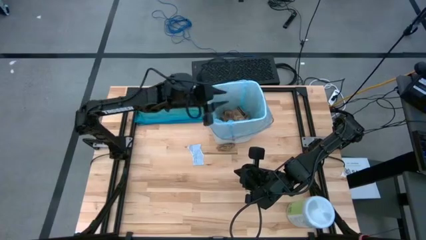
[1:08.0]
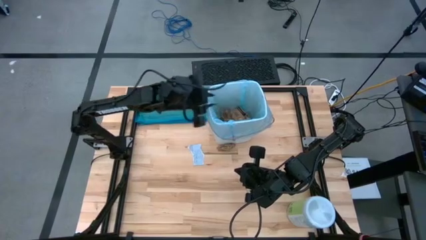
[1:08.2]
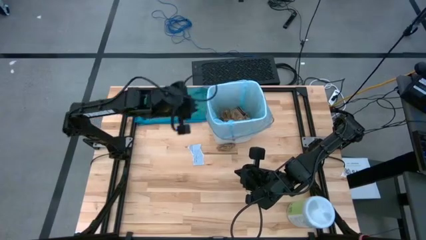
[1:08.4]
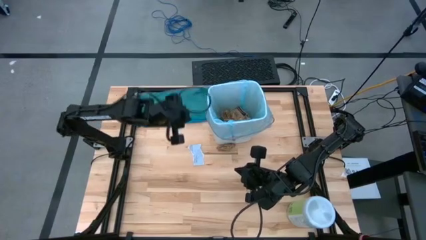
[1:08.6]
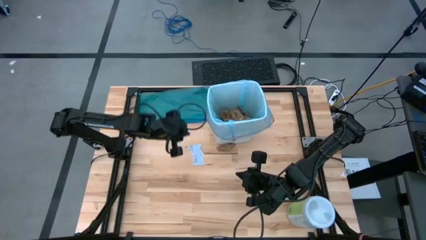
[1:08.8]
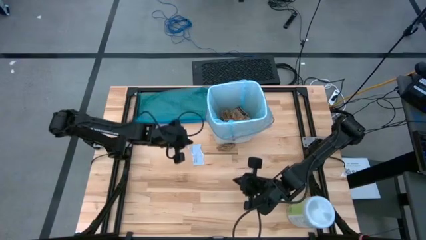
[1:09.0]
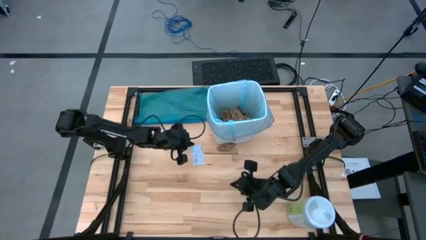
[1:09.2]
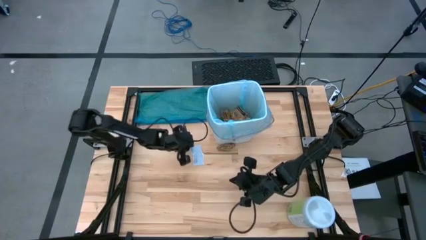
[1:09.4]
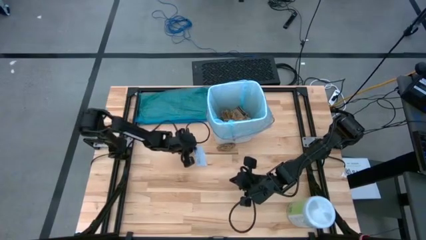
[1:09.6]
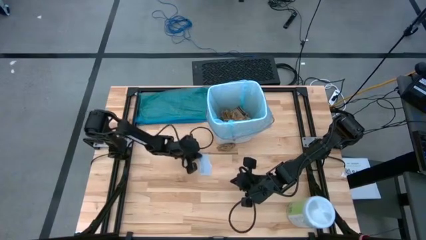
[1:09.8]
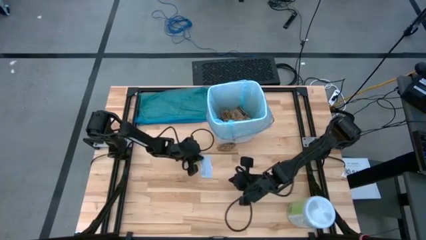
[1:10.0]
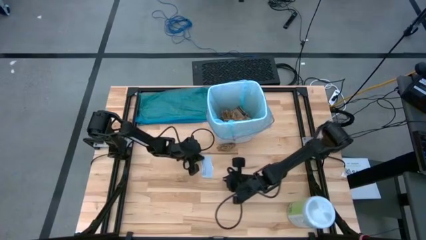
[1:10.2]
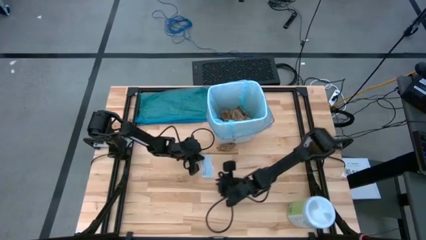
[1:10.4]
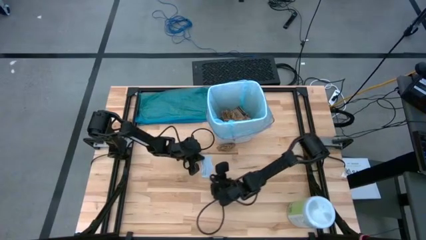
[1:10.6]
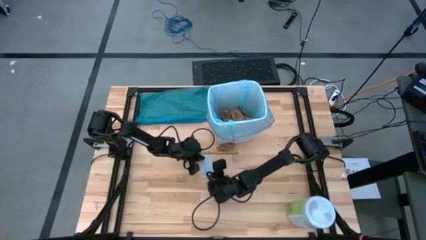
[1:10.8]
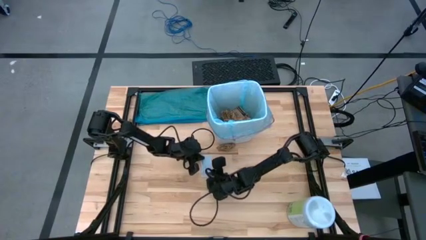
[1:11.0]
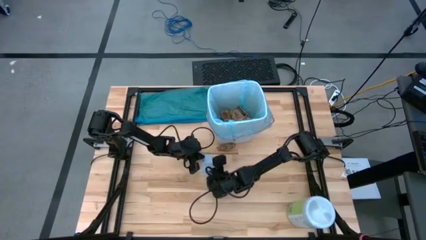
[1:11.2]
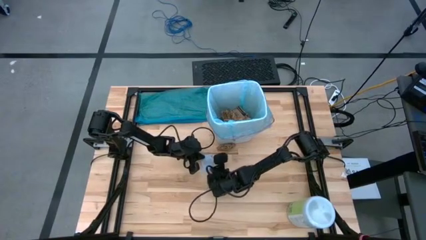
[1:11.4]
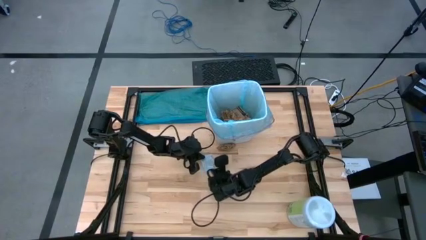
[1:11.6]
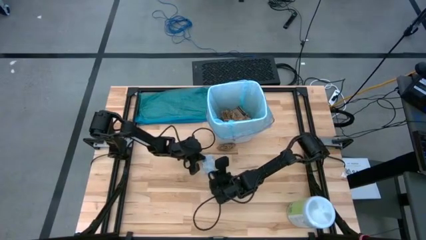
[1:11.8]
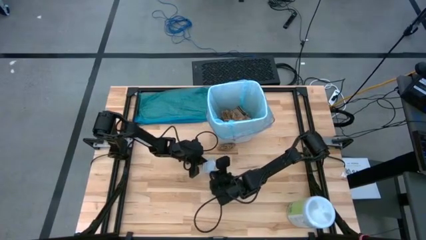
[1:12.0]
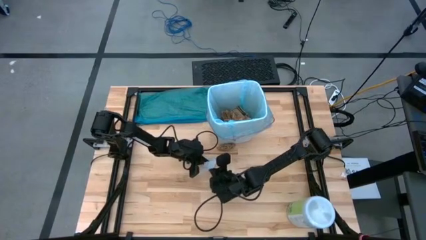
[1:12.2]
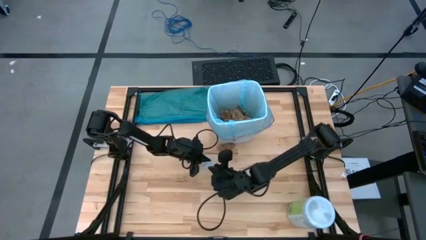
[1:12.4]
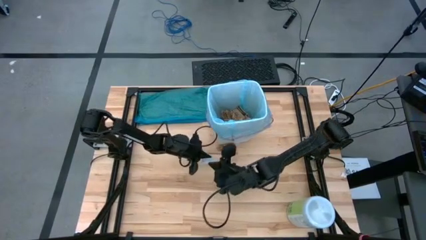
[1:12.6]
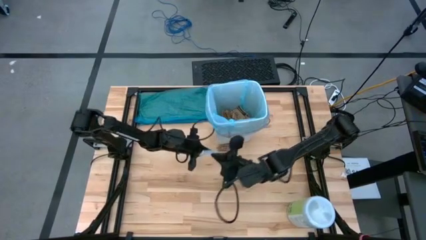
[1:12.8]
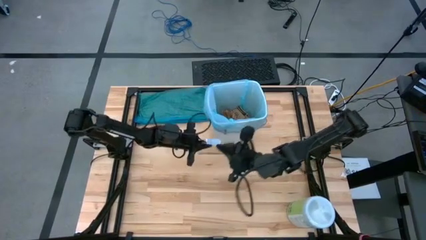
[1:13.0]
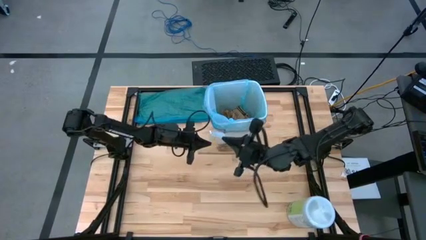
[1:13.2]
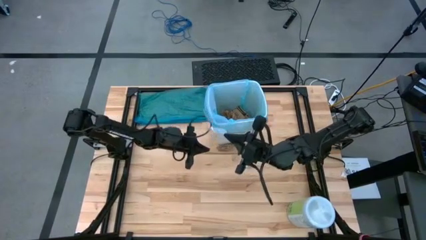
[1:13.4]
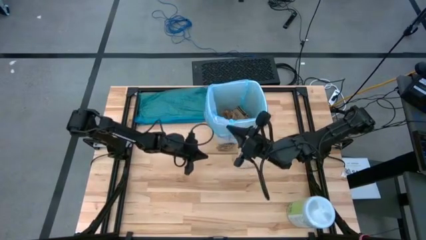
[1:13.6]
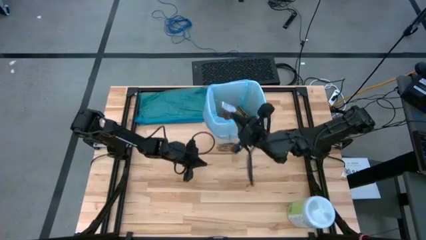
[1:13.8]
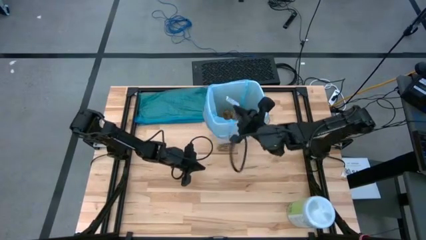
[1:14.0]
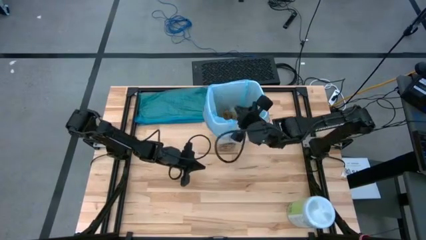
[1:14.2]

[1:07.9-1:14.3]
Task: place trash/remove bag and relplace
Put the white paper into the blue trash bin

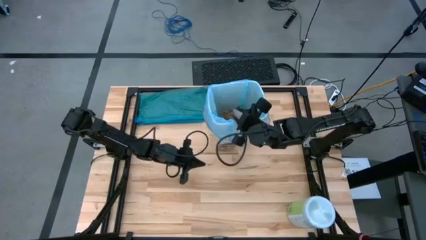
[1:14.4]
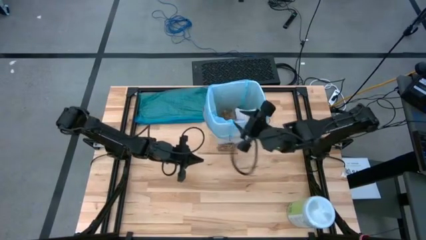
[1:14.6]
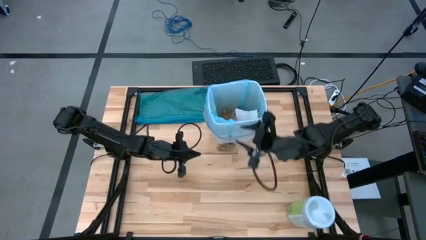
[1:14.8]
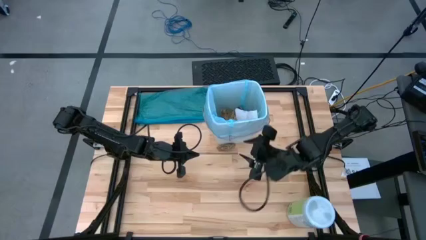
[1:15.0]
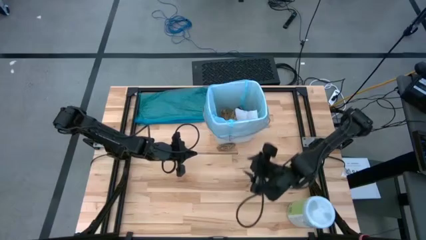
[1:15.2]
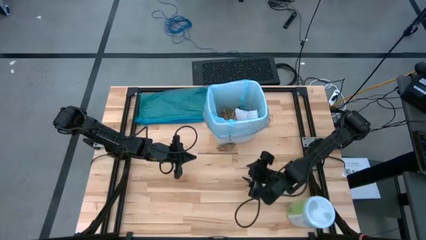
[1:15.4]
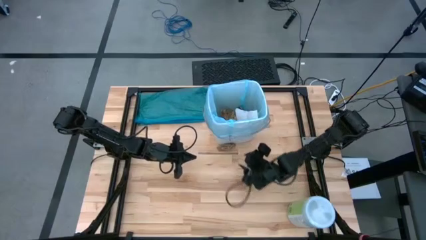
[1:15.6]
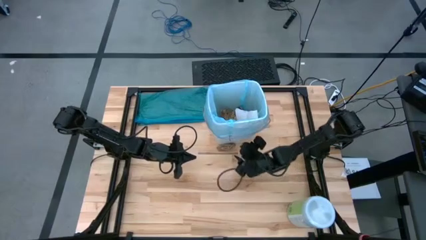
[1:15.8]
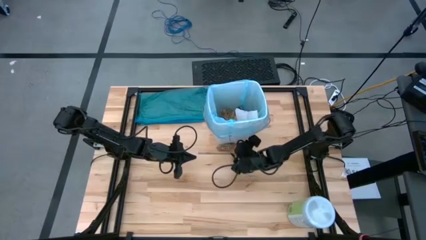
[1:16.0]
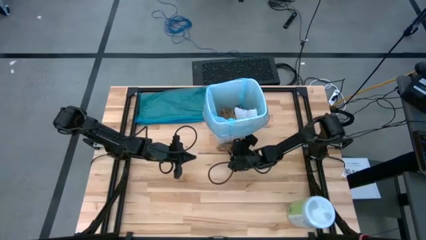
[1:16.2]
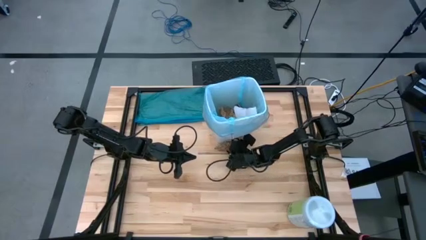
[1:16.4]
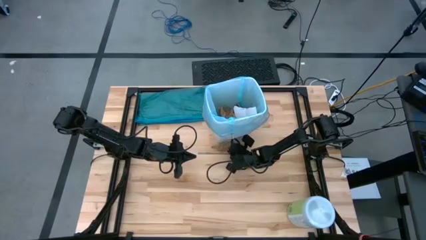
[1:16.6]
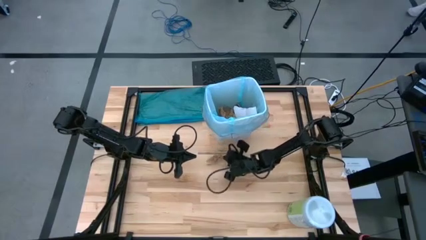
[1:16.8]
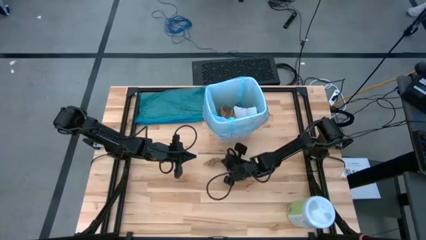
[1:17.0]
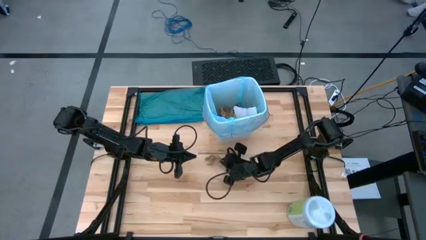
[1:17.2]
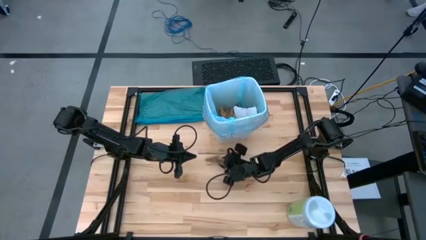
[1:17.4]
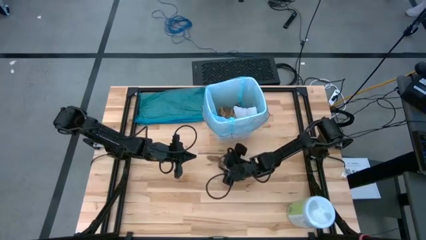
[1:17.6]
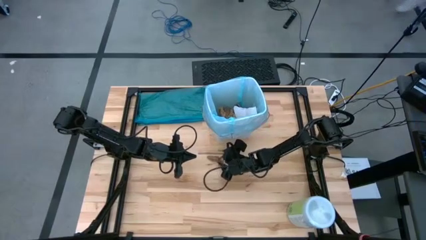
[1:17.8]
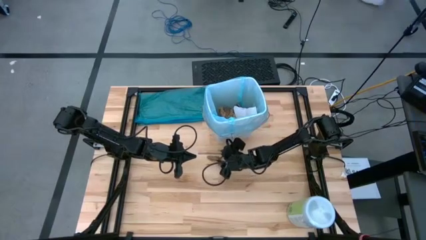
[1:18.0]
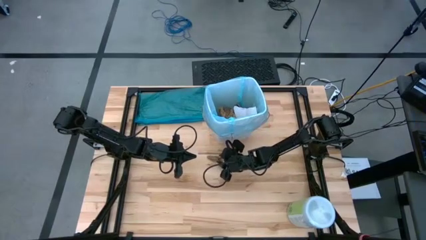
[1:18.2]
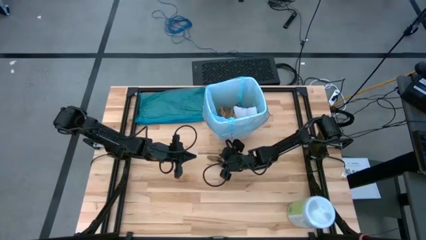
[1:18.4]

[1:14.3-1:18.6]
Put the brown napkin into the blue trash bin

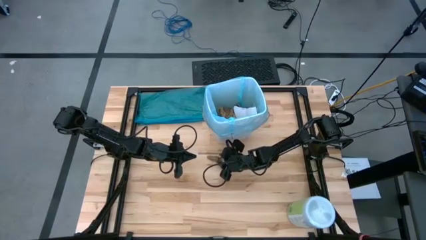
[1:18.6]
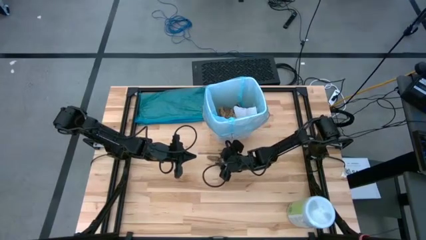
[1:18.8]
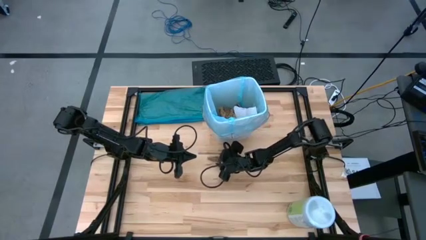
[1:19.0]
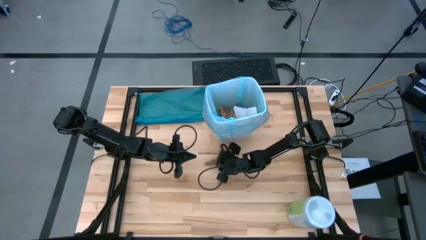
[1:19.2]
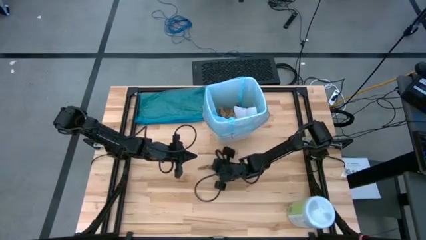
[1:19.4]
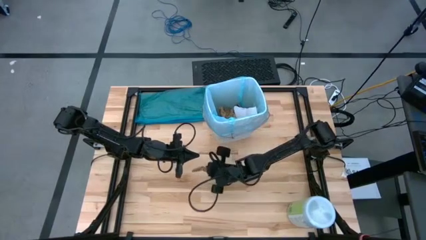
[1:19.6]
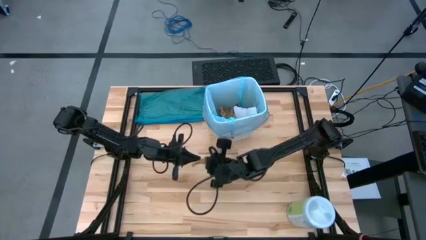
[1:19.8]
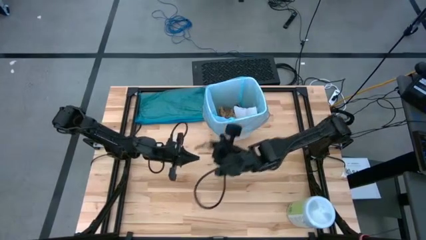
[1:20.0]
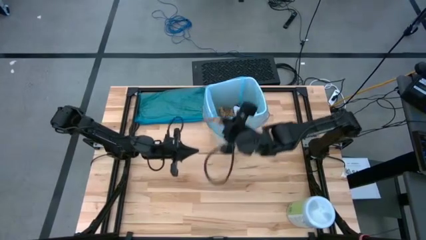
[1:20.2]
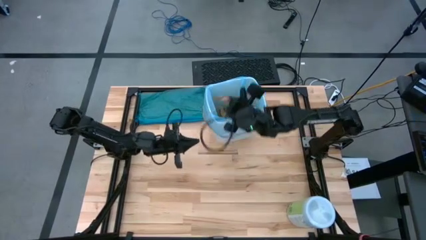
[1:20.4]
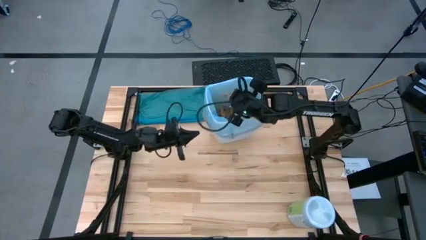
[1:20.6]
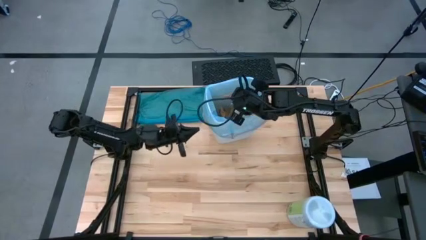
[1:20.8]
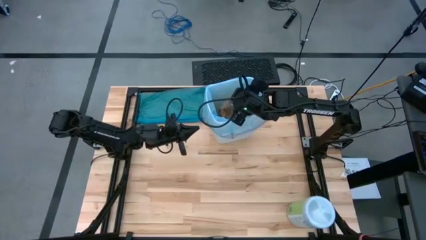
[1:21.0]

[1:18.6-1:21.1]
Put the brown napkin into the blue trash bin

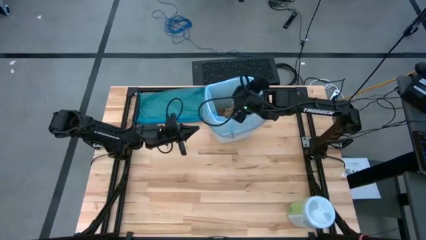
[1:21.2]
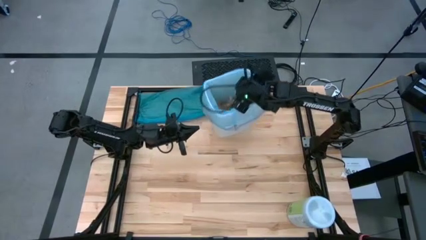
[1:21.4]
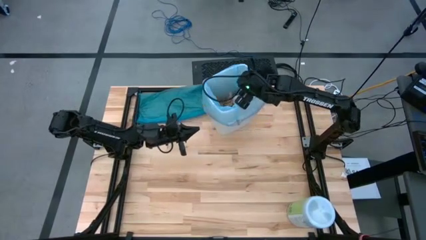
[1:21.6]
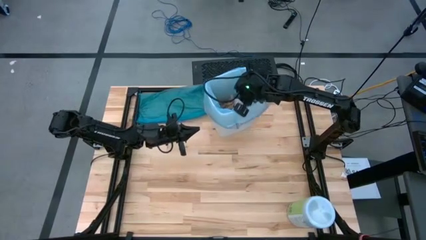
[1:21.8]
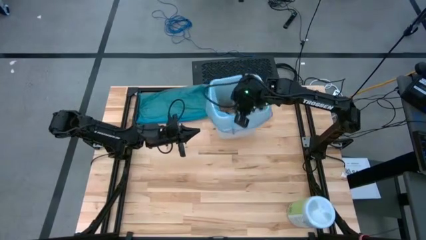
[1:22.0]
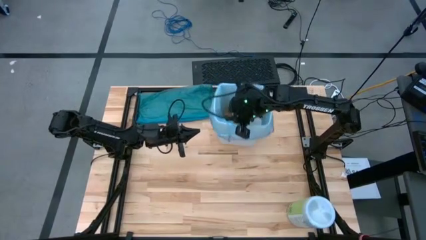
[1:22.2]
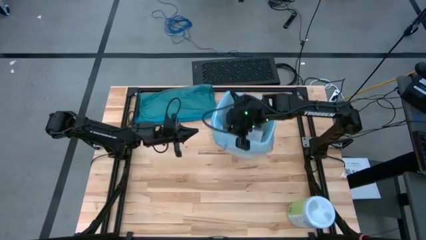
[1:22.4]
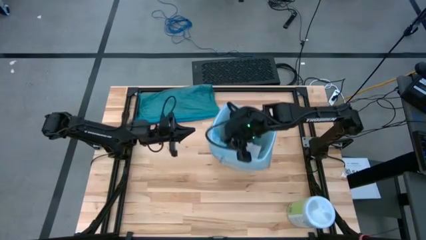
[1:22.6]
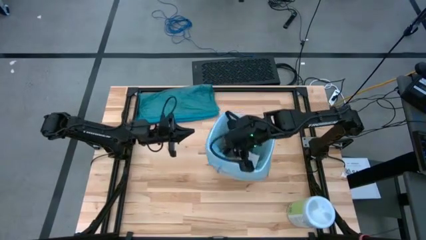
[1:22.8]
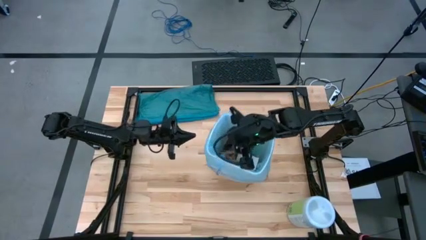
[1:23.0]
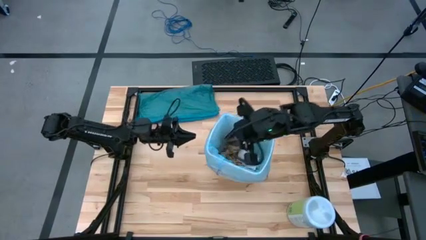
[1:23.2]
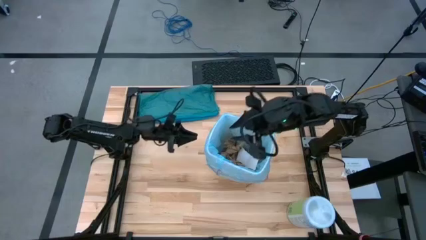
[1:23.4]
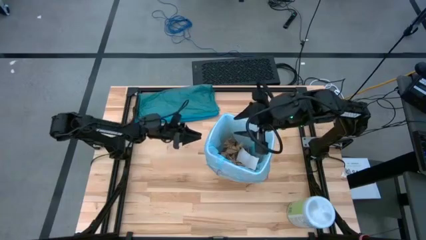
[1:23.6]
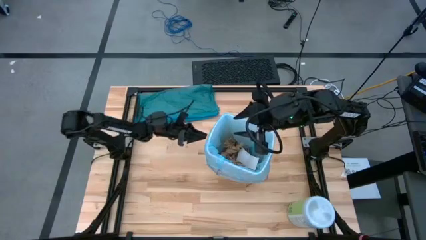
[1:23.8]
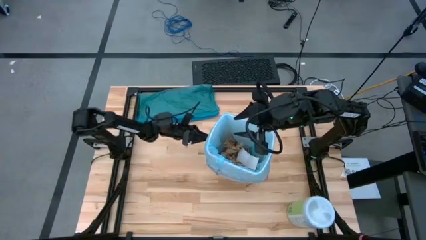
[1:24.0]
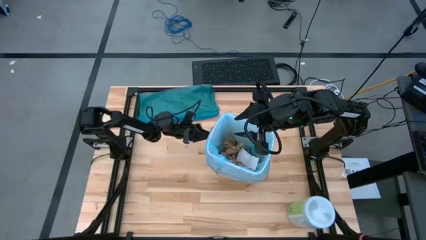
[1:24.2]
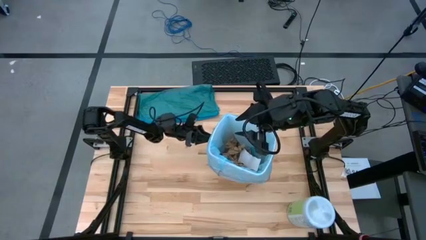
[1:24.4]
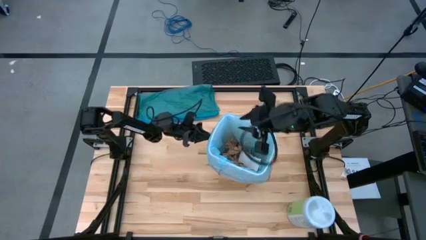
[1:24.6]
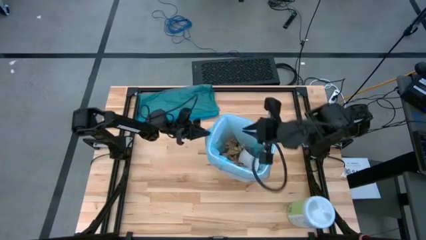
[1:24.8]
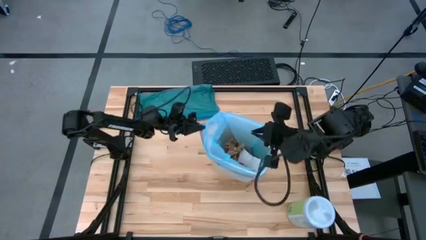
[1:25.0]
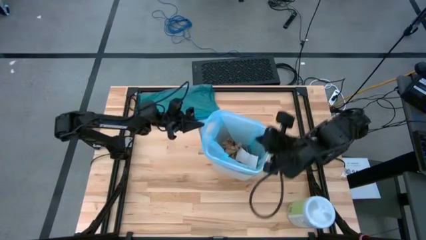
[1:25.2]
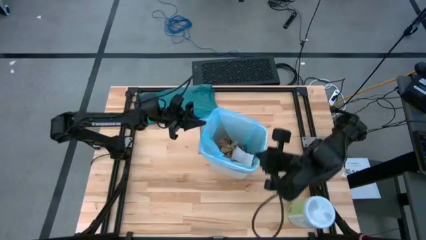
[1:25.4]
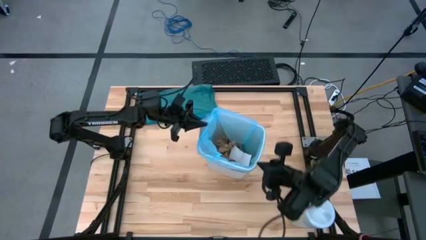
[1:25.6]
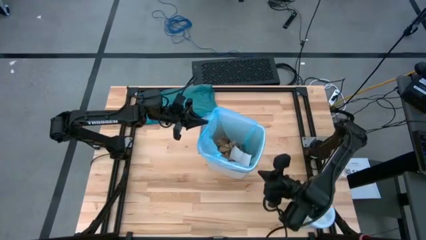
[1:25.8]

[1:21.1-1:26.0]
Remove the blue trash bag from the bin
